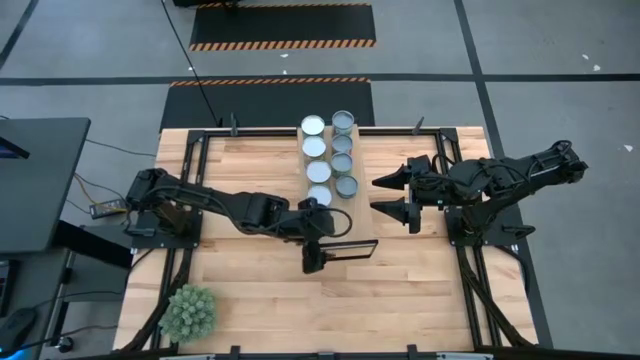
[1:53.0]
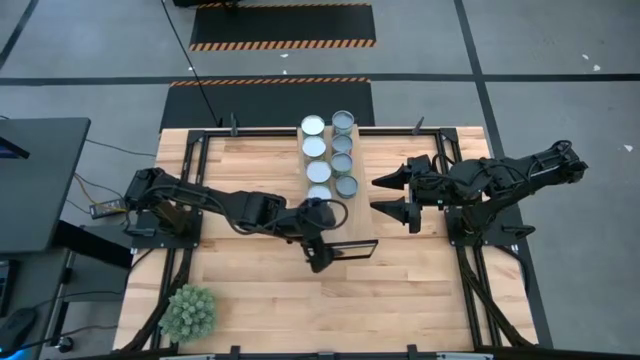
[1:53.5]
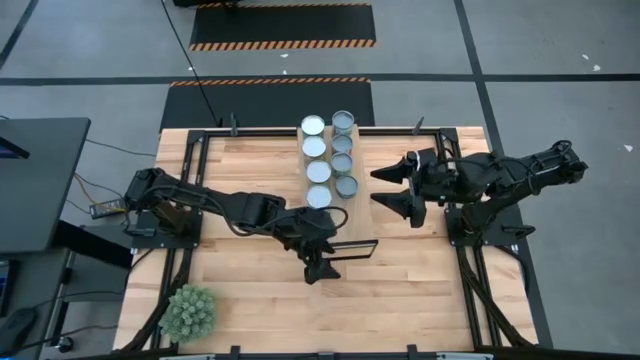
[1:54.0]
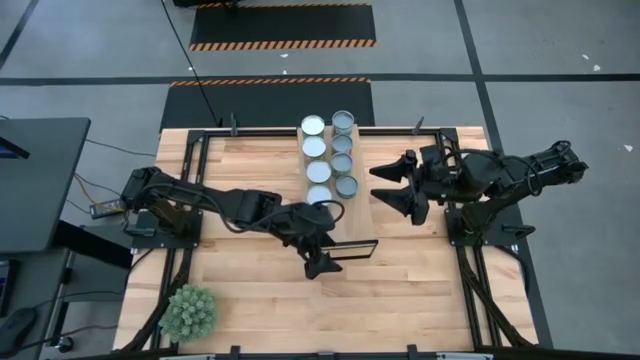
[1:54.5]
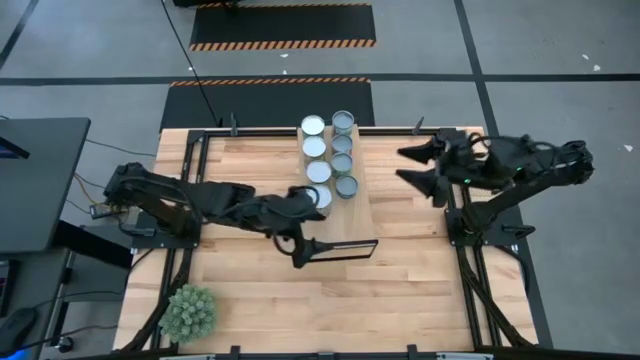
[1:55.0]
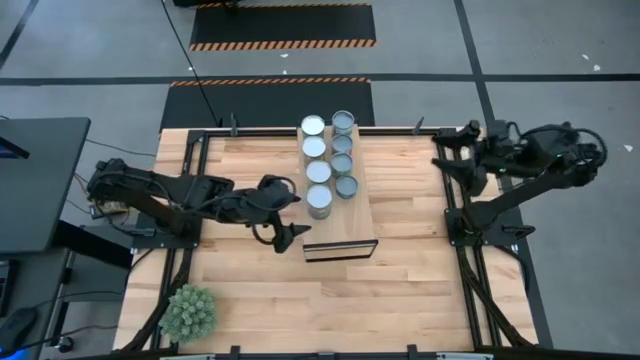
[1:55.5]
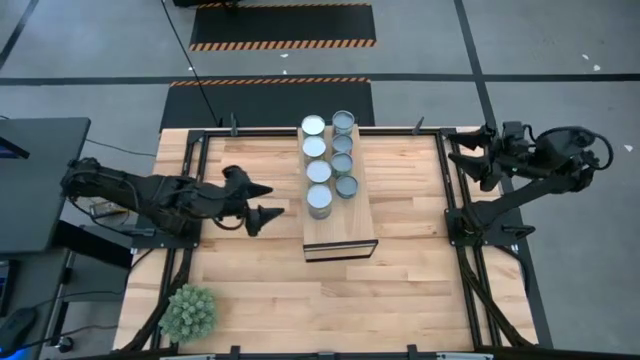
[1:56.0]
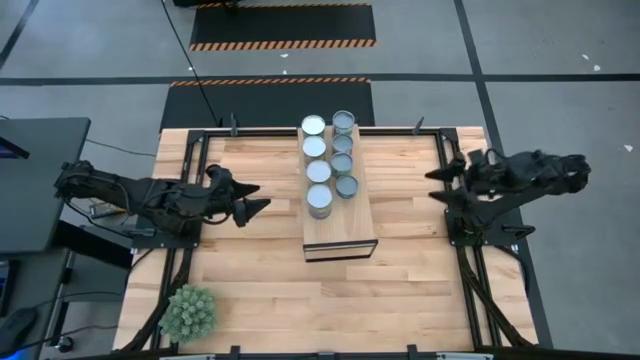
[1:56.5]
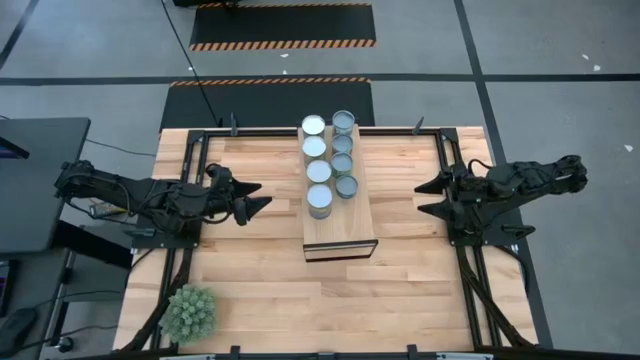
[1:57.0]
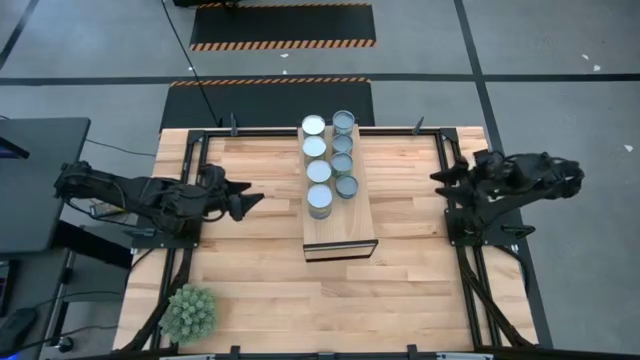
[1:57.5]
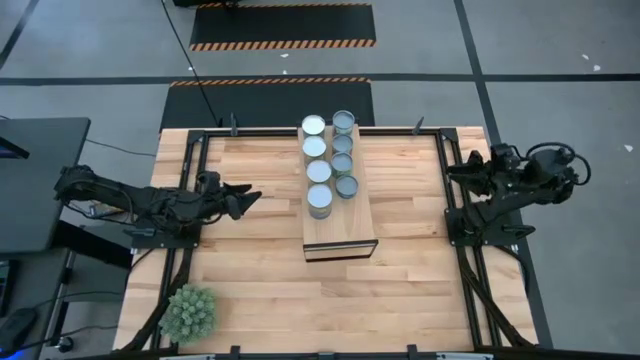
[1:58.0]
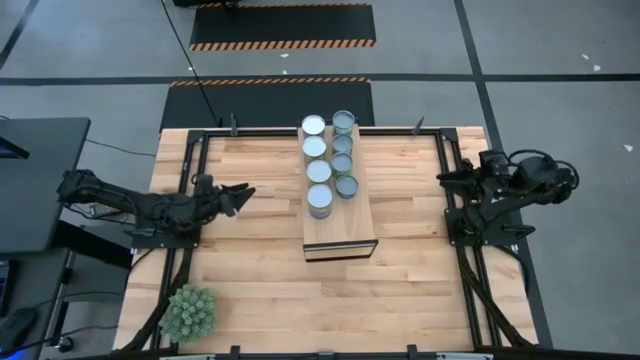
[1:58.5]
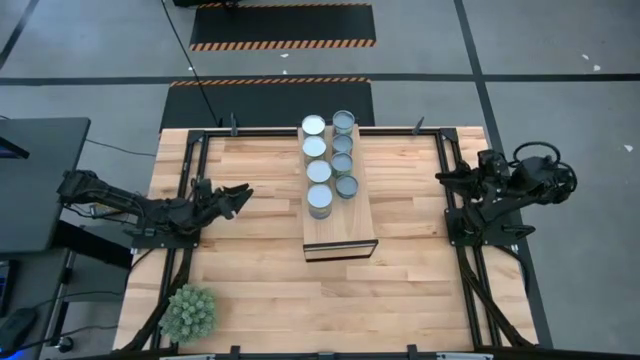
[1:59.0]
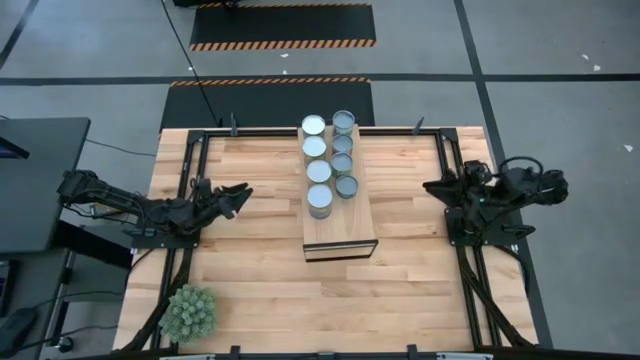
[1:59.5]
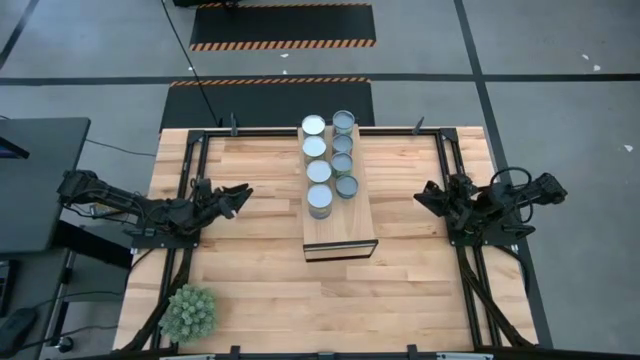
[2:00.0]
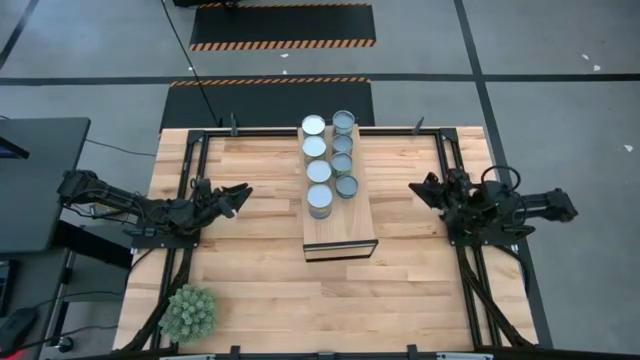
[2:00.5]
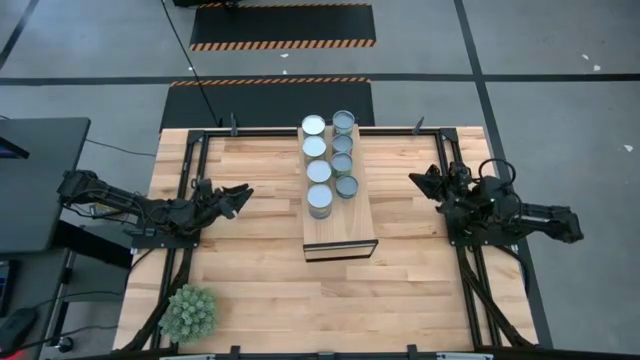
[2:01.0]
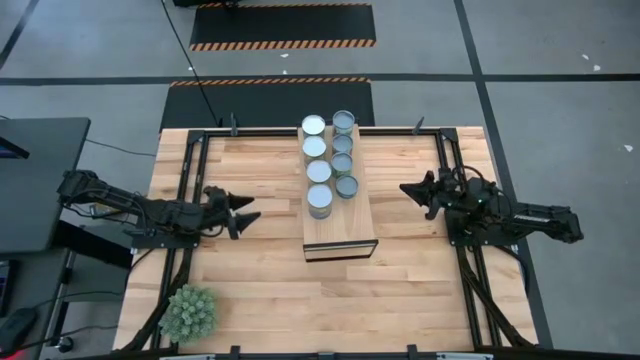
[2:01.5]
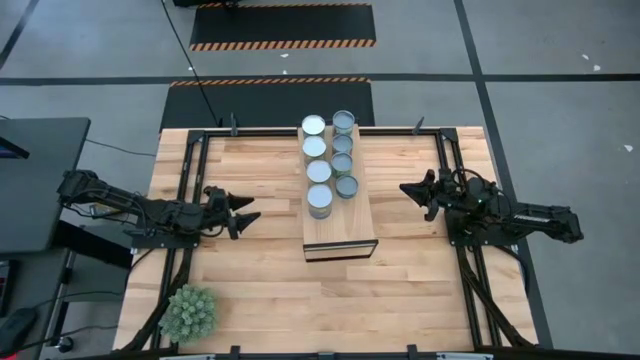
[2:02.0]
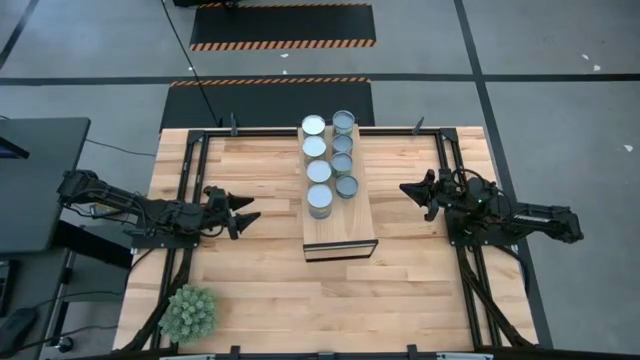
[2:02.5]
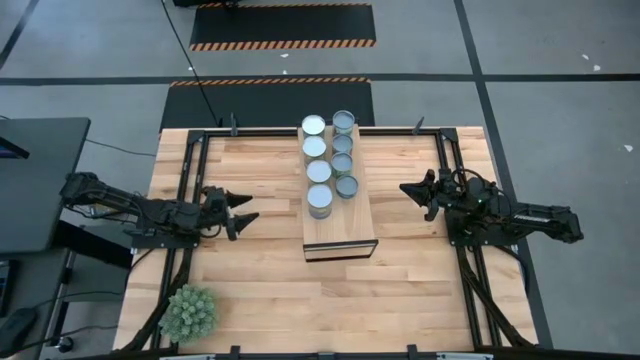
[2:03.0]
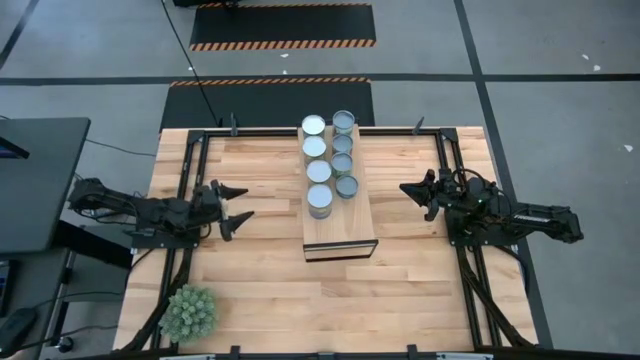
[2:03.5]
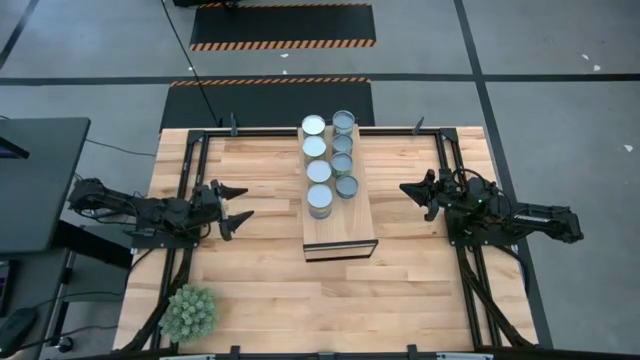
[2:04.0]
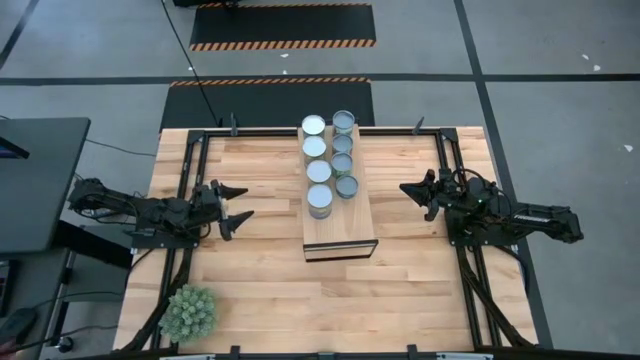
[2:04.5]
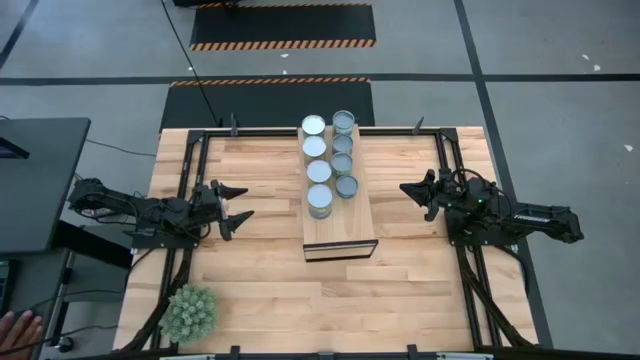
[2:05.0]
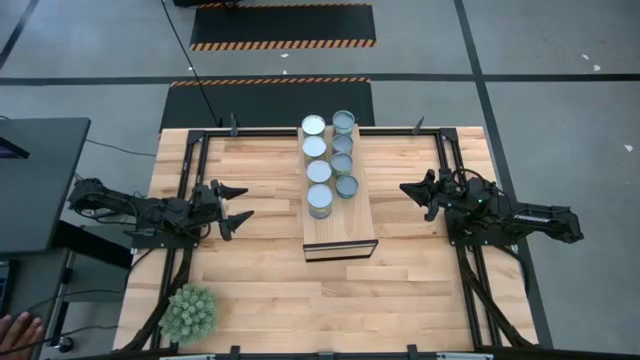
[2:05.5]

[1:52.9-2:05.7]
Task: Pick and place cans onto a shelf
Return to Home Position

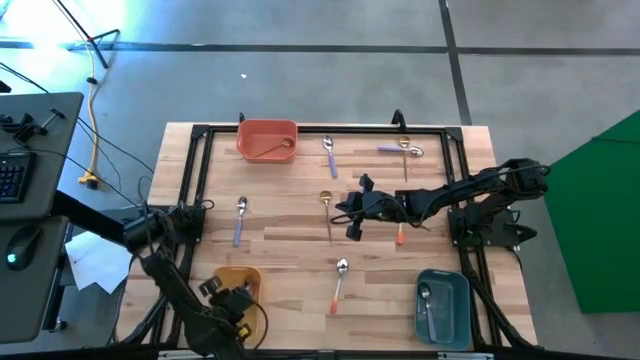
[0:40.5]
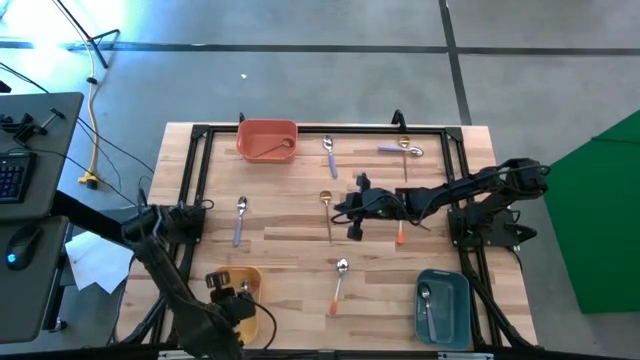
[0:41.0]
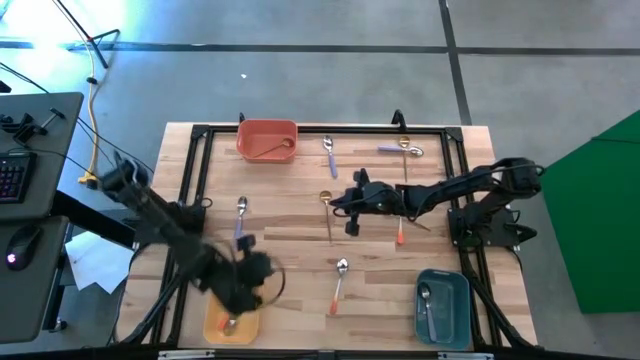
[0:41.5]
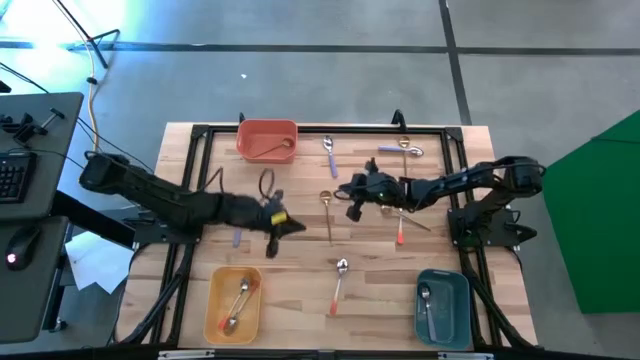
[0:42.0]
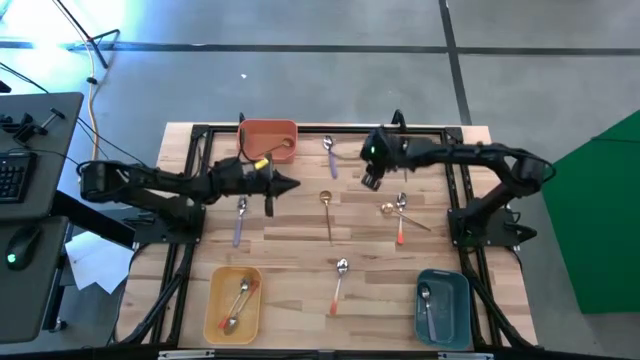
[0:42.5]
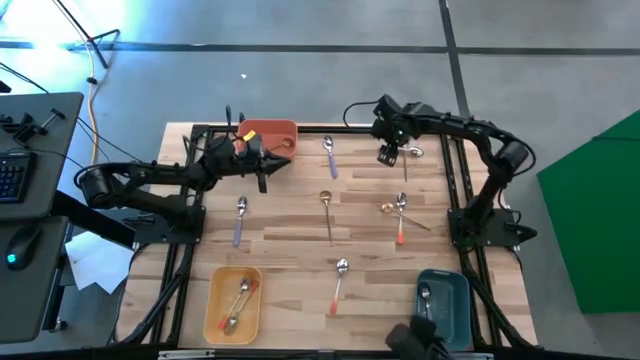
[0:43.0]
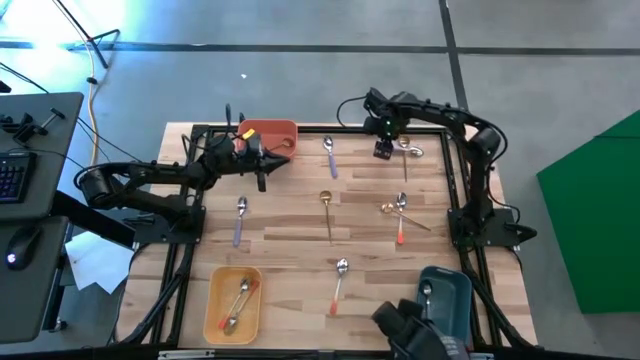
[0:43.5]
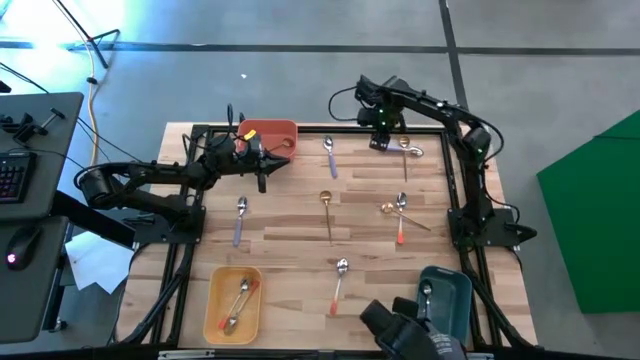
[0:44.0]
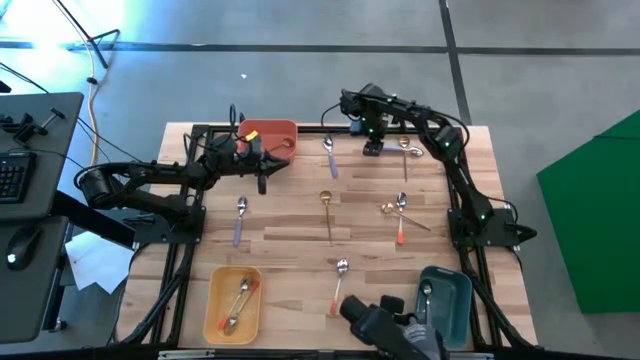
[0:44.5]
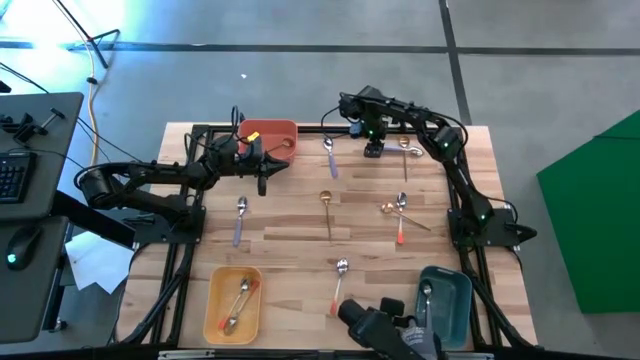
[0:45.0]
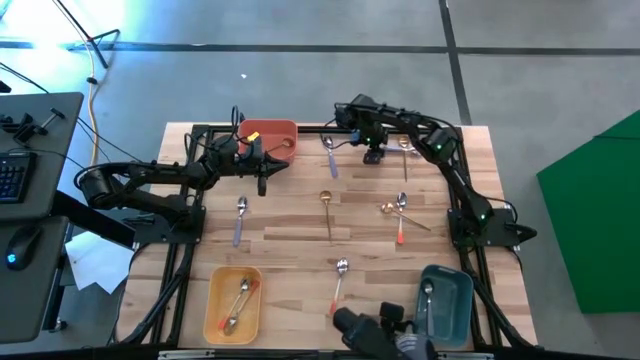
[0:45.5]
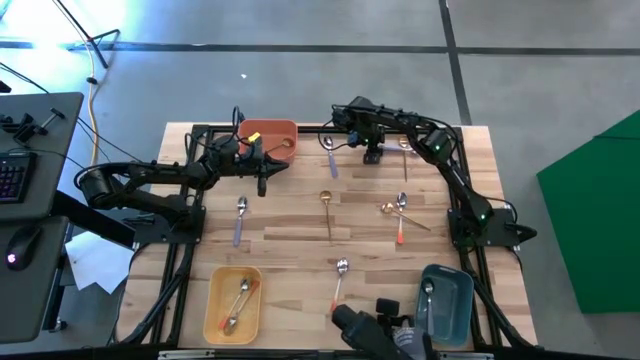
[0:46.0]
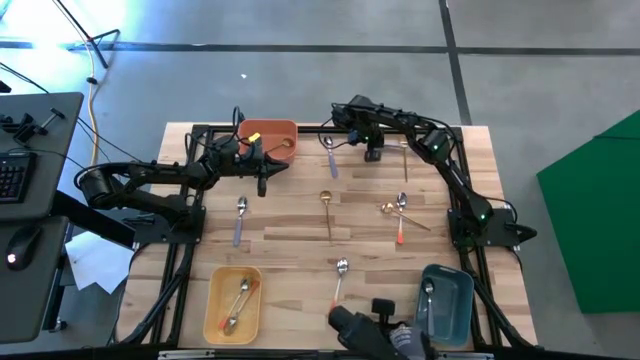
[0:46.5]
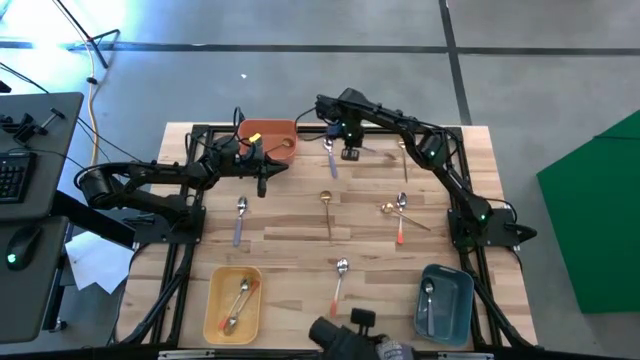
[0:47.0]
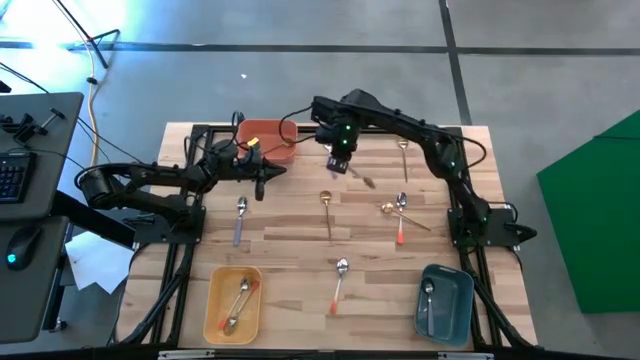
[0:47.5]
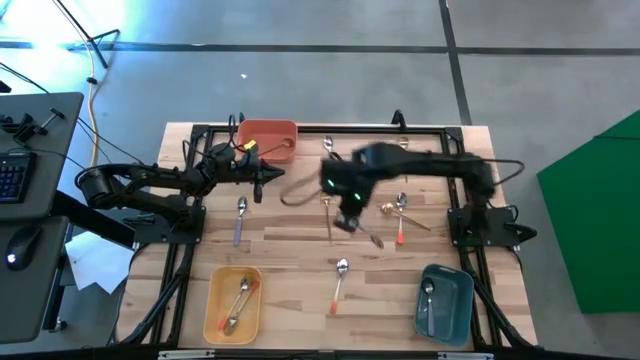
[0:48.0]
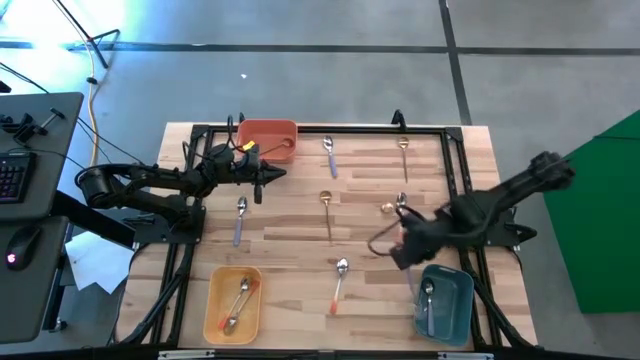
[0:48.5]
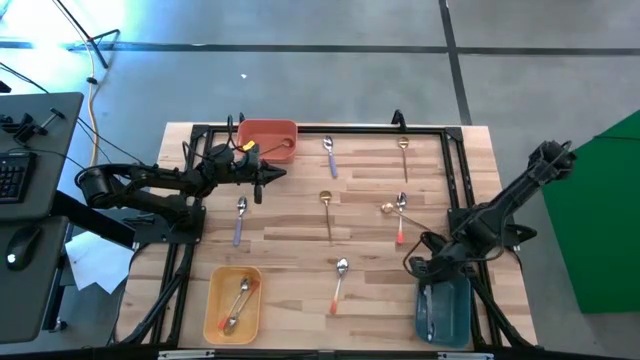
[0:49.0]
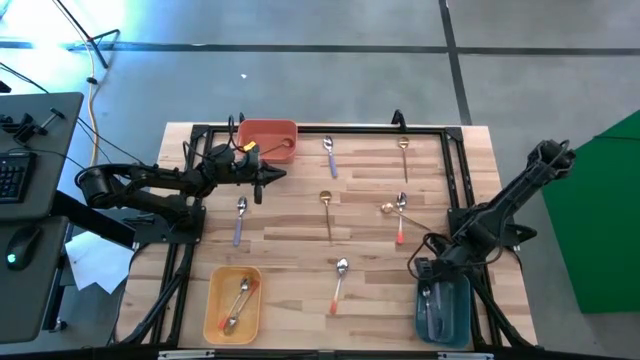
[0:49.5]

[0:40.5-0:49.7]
Task: Sort silverware by color (type)
Put the top right purple spoon into the green bin
